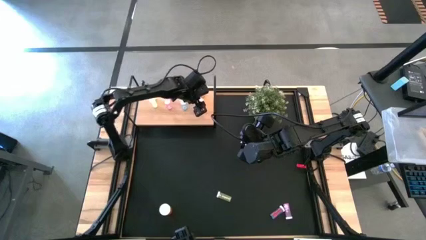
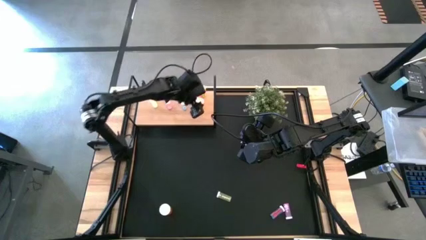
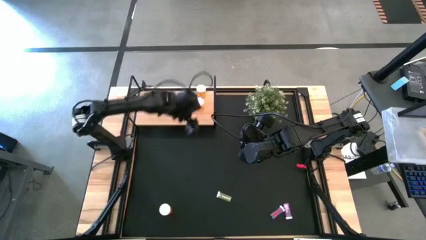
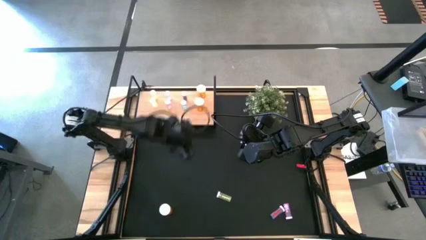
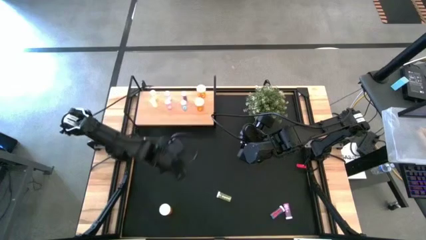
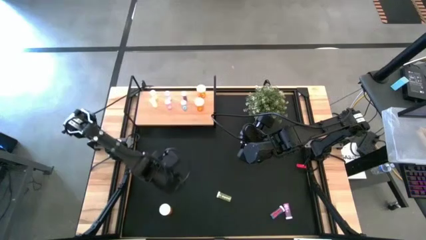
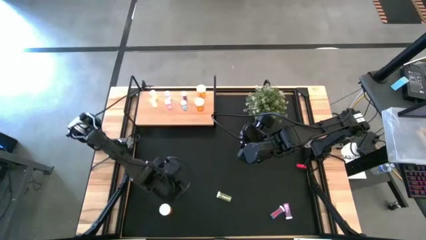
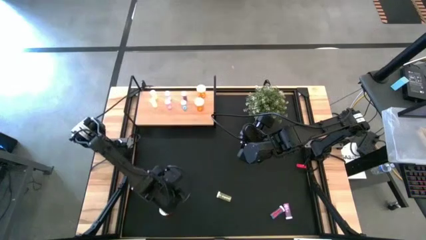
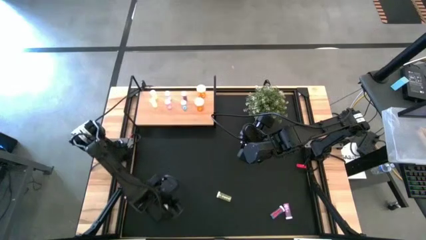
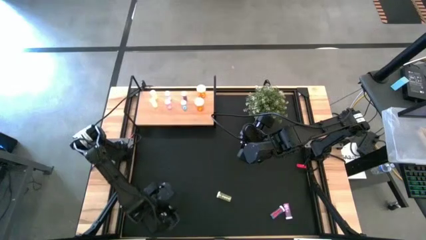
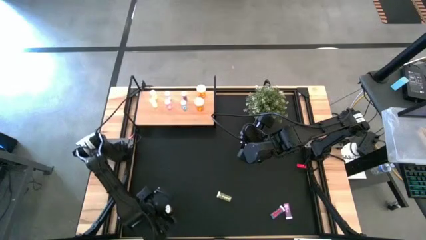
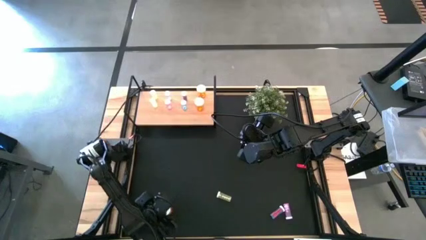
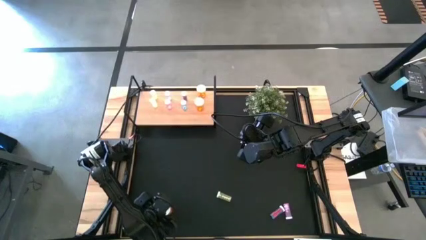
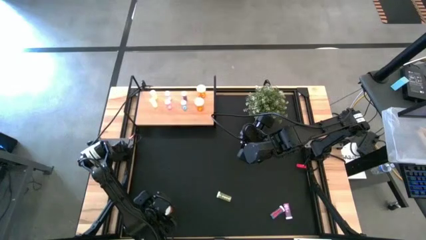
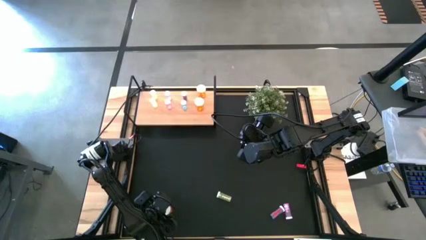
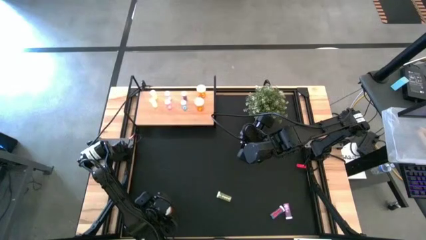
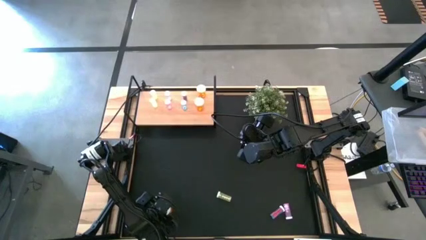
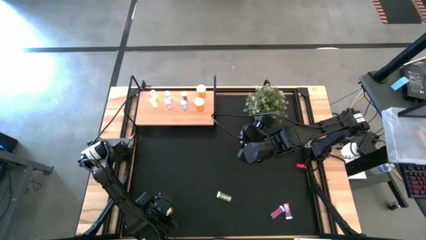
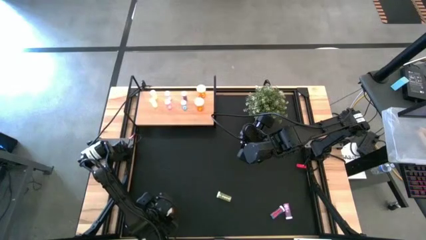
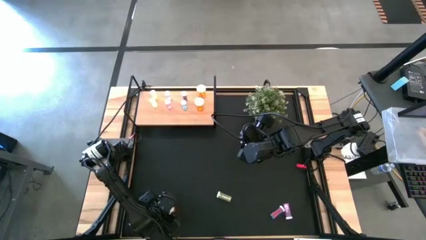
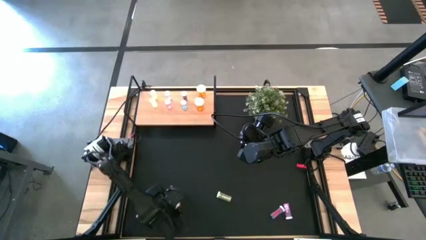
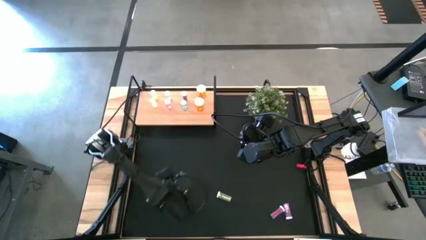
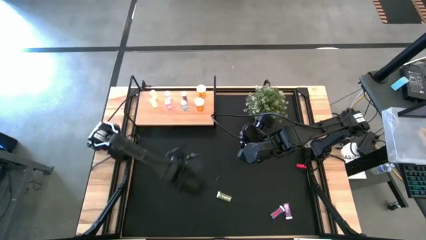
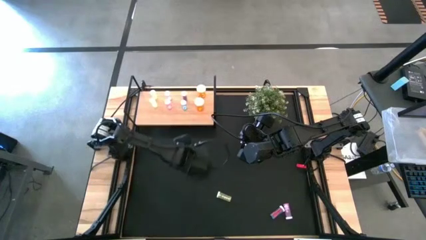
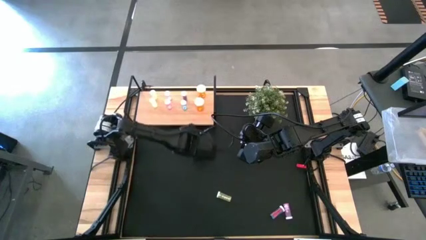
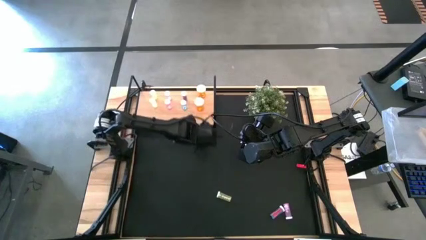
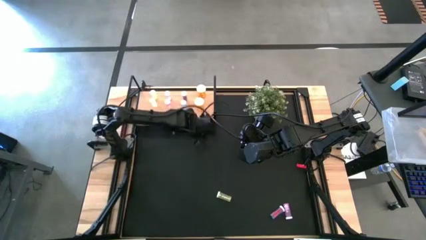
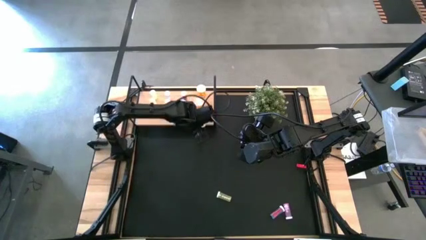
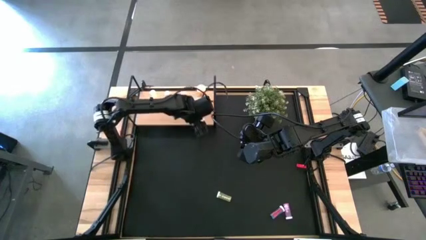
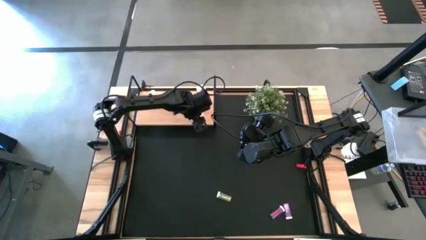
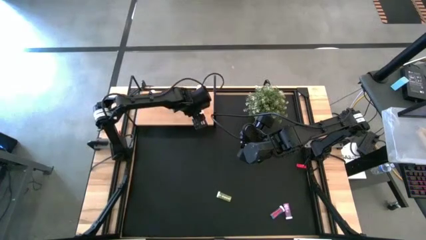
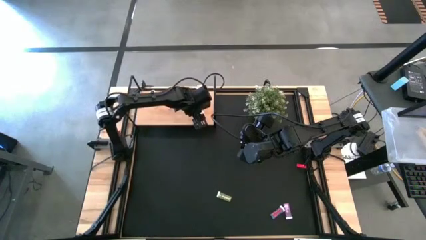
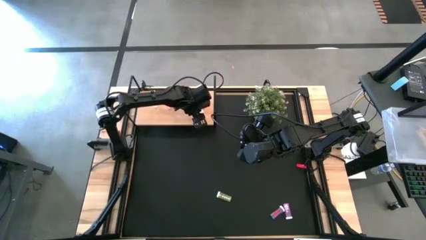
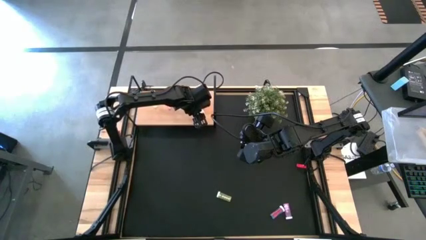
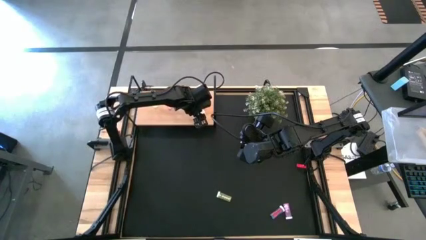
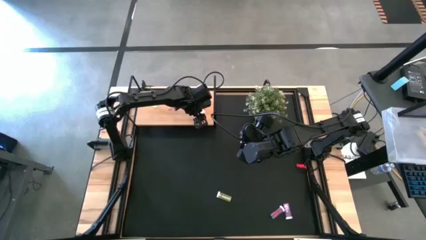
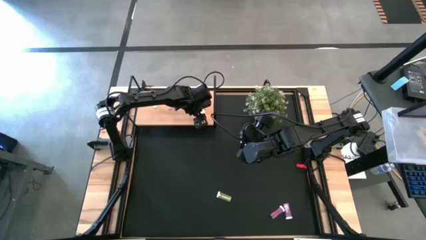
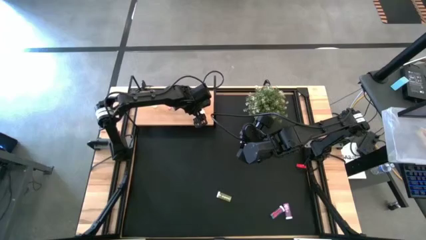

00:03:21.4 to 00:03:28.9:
Task: Pick and place medicine bottles onto shelf by color
Put the orange medicine bottle on the shelf aligned with the other orange medicine bottles

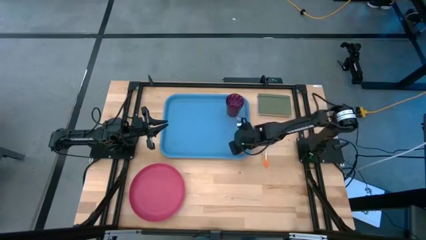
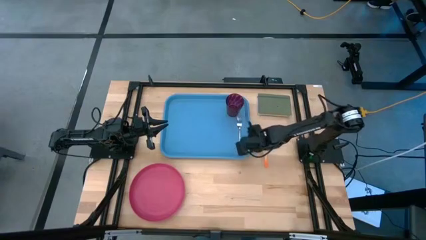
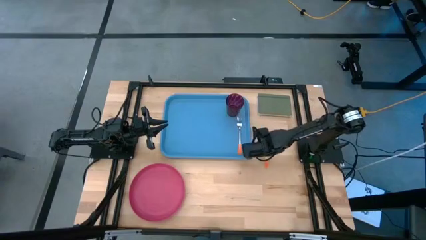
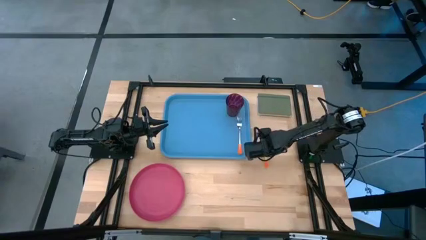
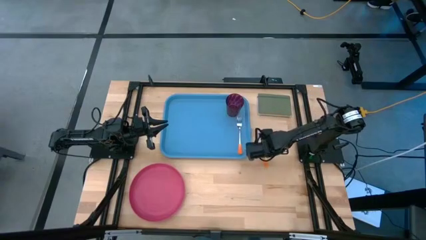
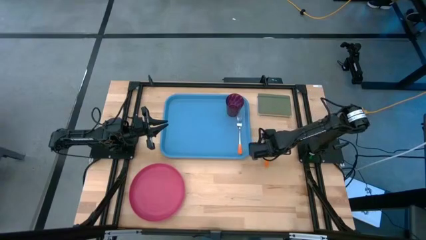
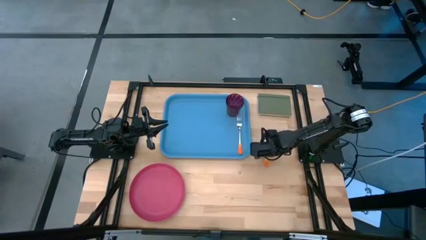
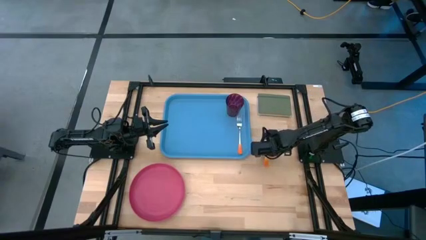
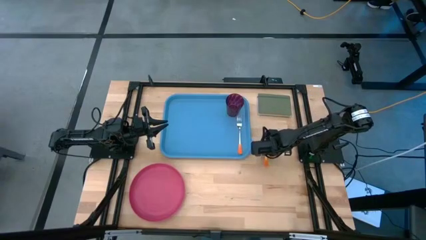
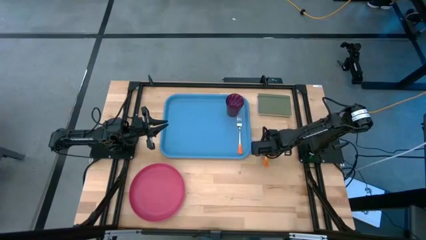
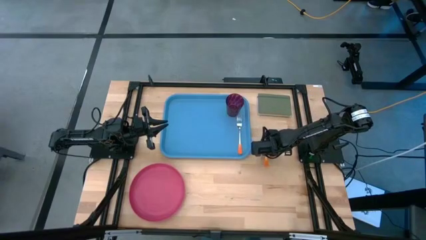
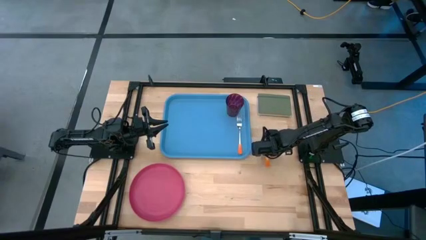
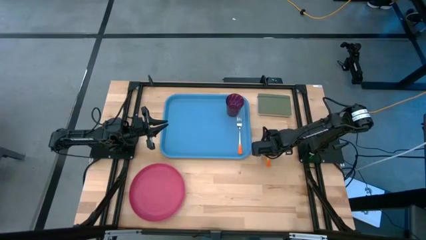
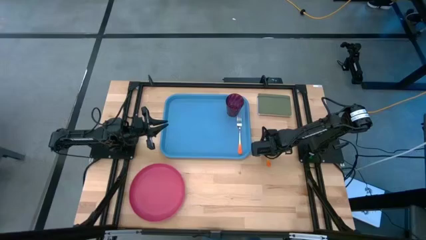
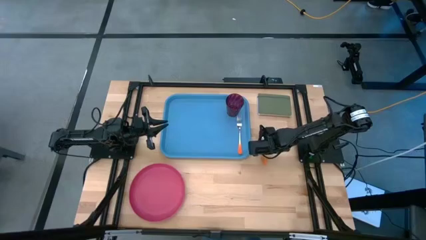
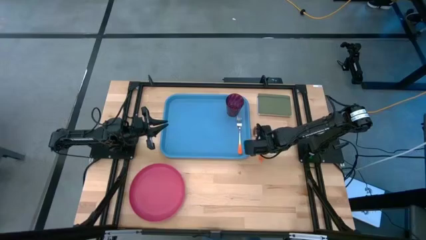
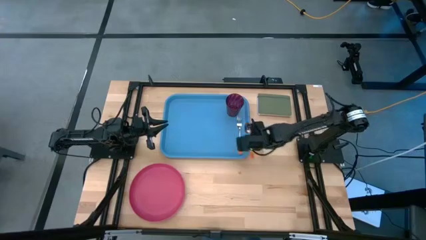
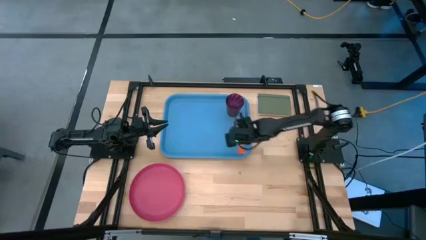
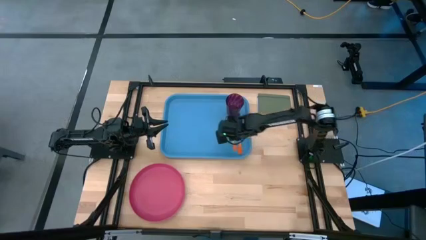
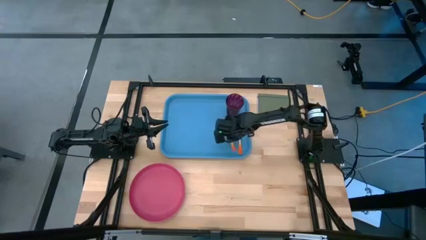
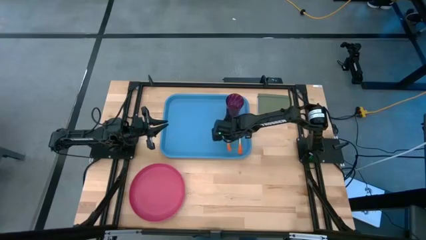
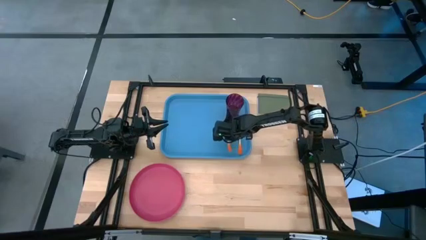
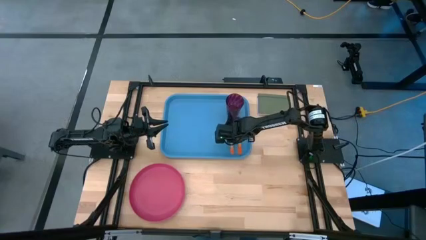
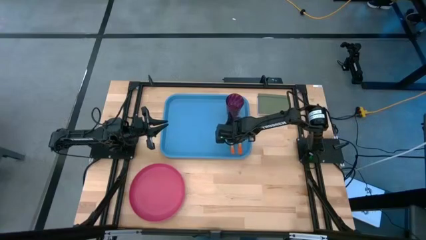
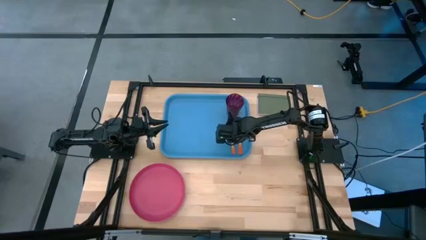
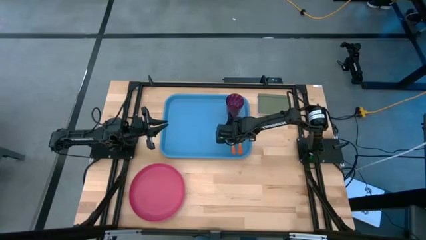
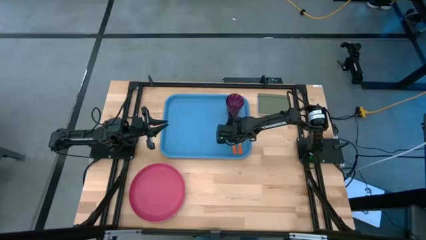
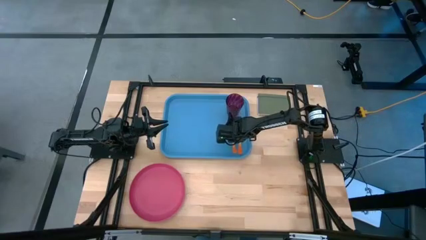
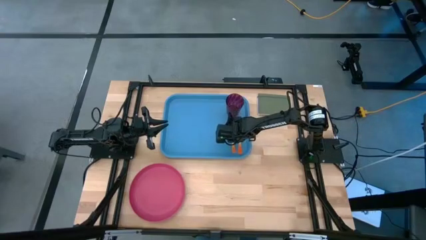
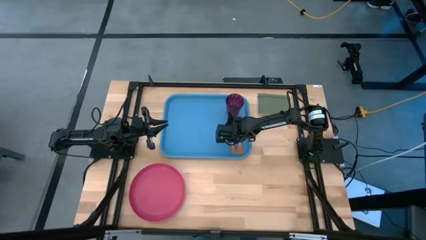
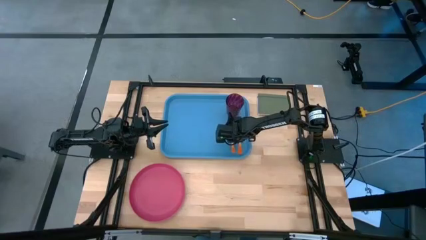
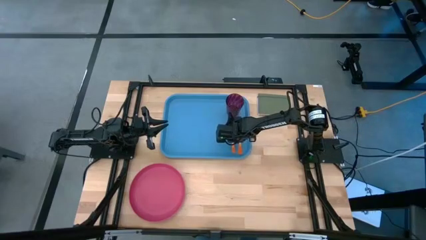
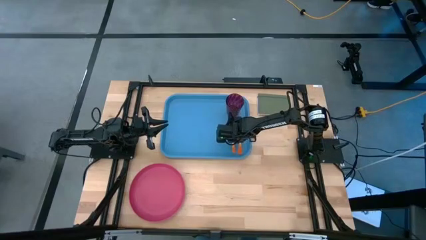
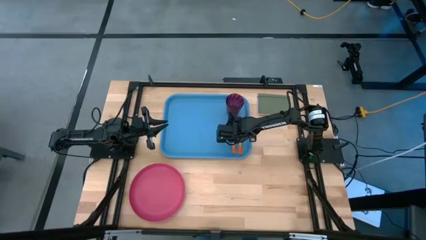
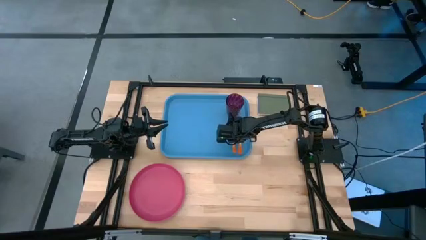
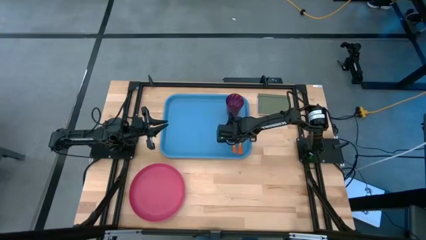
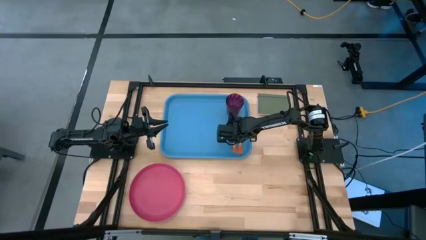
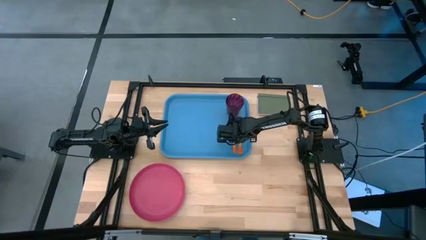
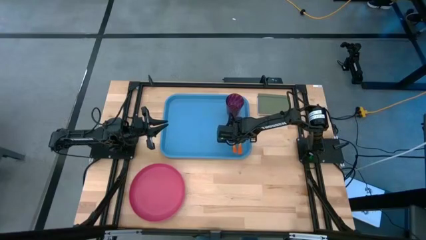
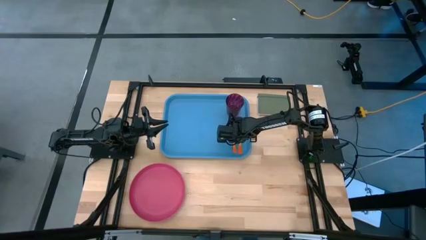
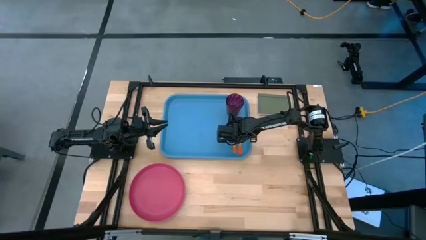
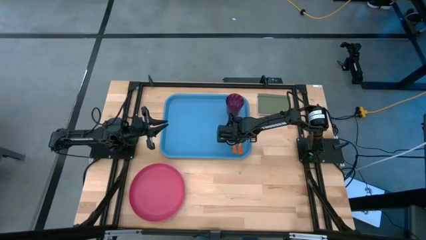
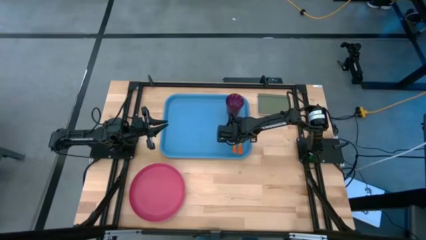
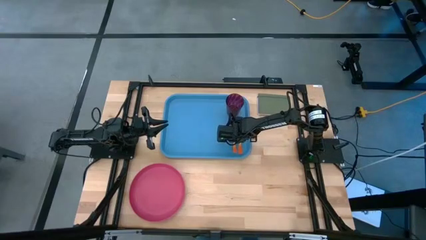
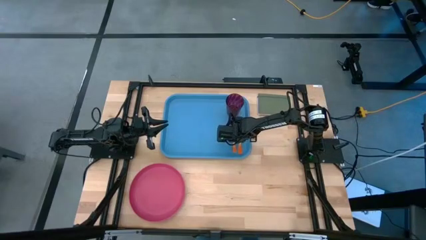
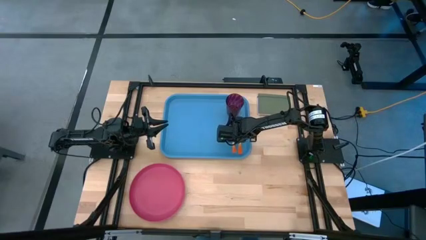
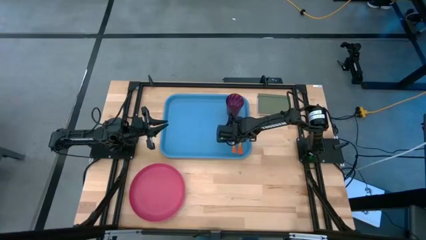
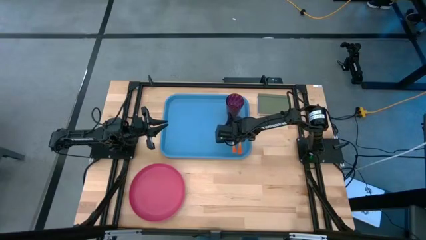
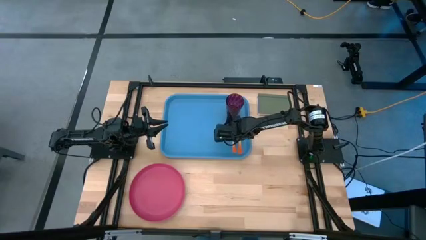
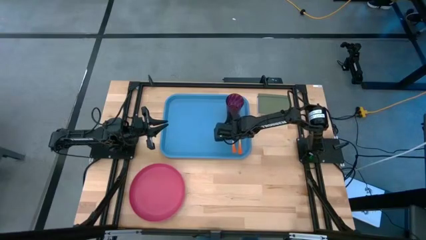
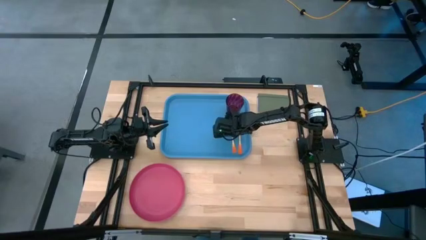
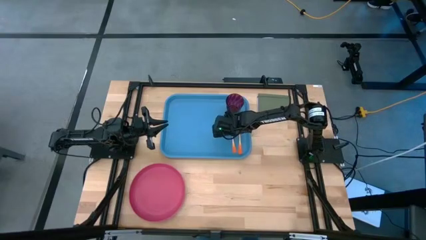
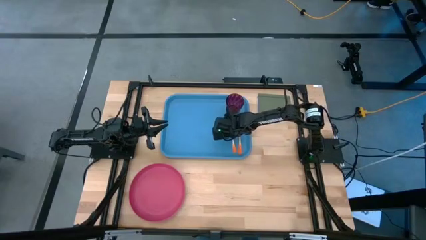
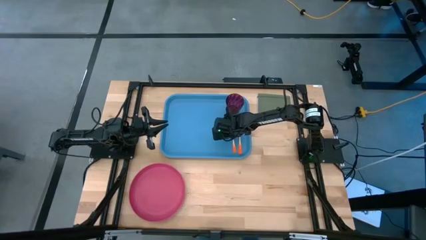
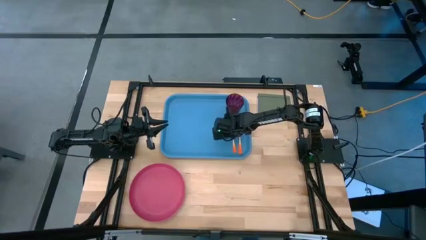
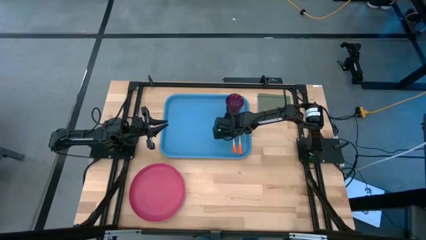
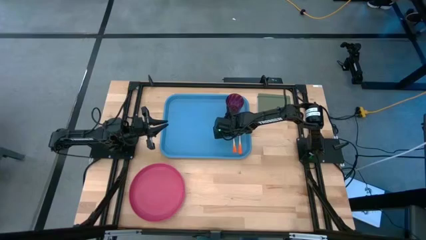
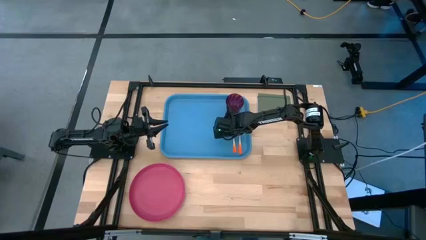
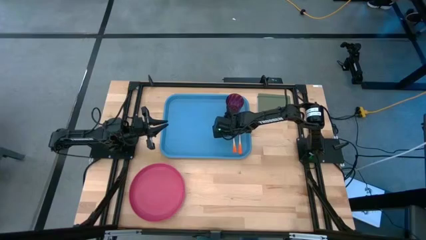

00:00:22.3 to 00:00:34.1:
Task: Pick and place plate/cup/fork/spoon on tray
Put the orange spoon to the left of the orange fork on the blue tray
